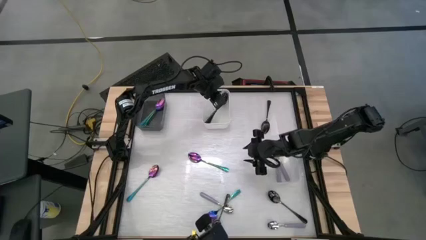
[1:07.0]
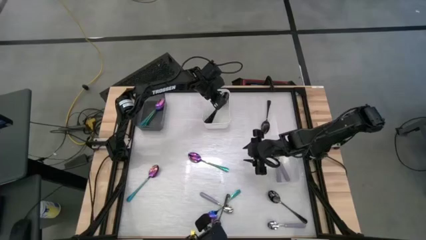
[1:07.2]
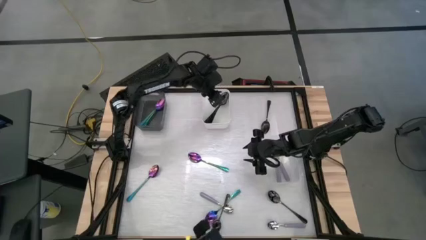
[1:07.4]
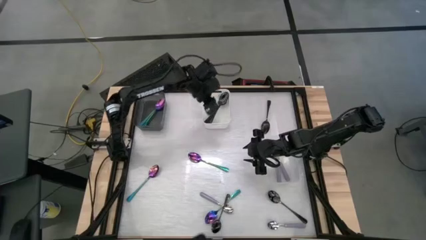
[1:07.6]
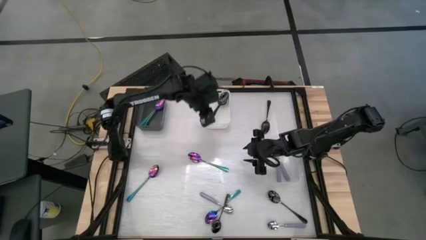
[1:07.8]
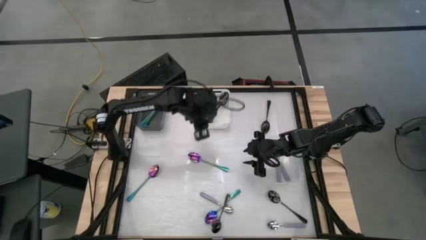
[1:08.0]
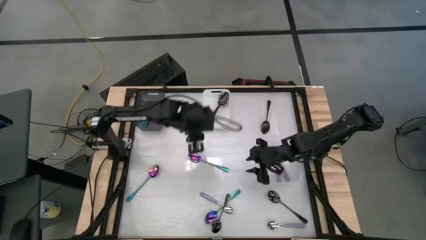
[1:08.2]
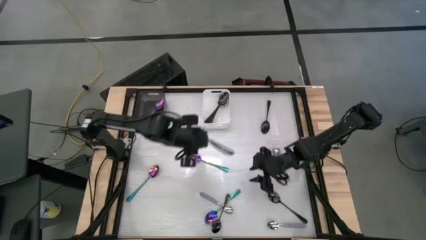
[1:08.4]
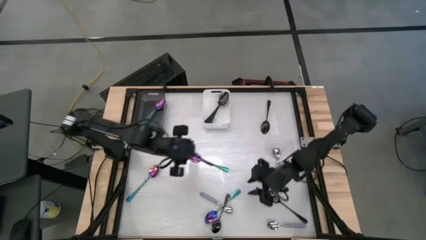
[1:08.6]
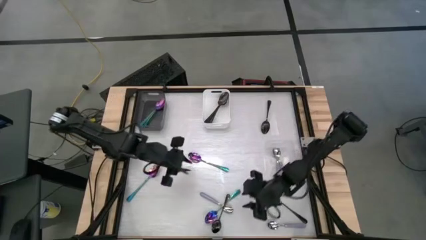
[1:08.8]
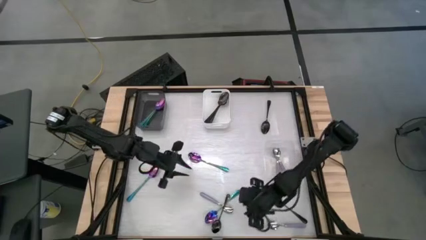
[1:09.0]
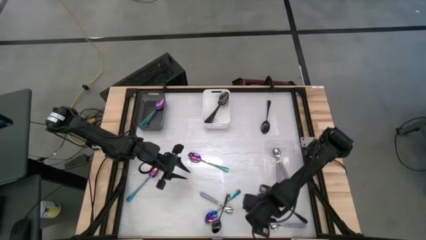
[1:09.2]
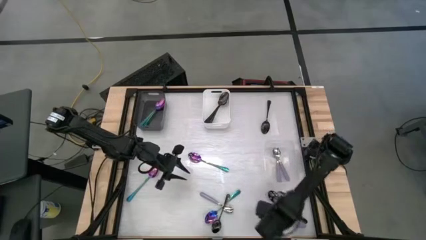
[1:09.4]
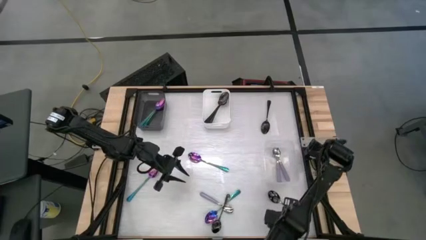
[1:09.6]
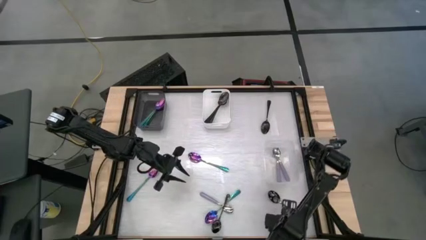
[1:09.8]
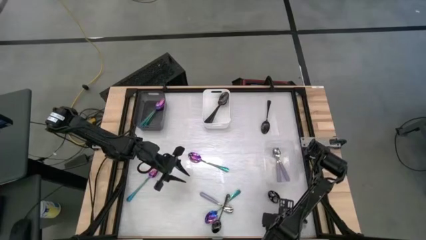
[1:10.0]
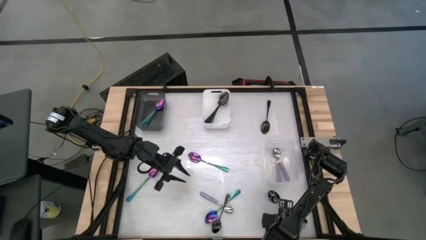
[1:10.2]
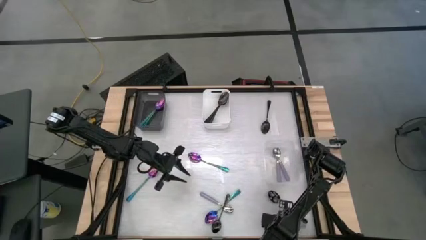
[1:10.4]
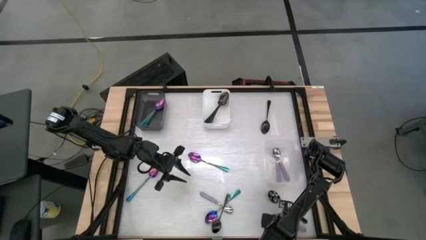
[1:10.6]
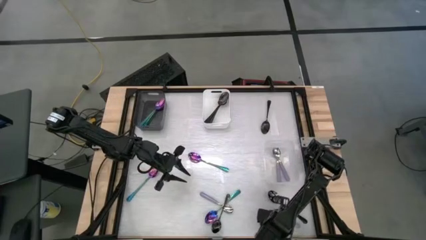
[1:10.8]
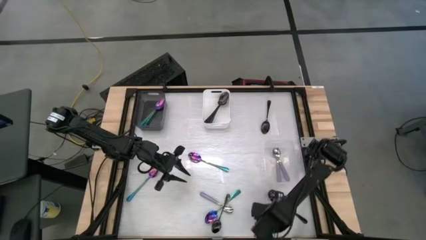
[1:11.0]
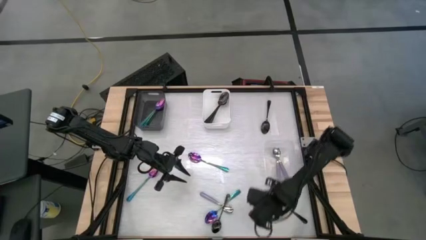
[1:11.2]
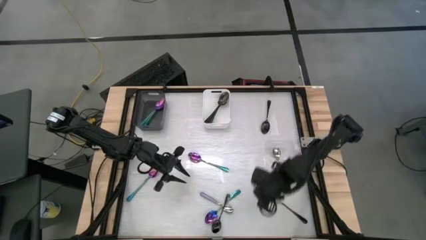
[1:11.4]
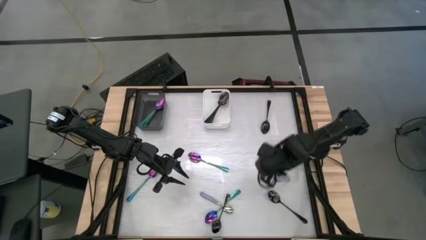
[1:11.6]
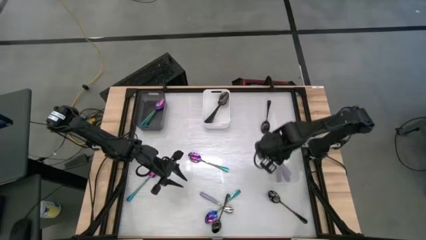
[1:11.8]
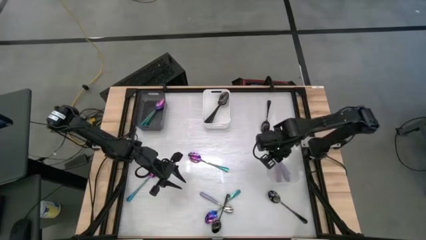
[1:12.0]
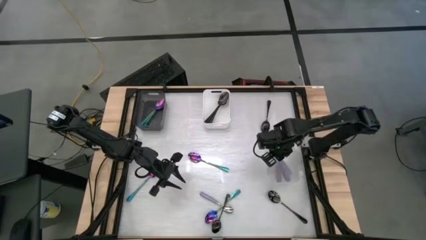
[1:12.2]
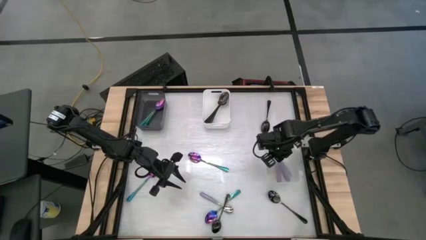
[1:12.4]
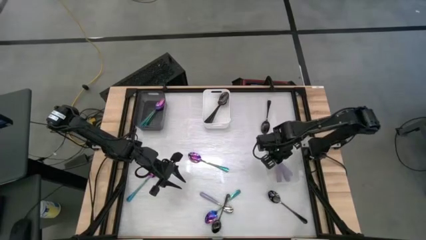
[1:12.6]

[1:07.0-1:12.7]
Task: Sort silverware by color (type)
Put the violet spoon into the transparent bin

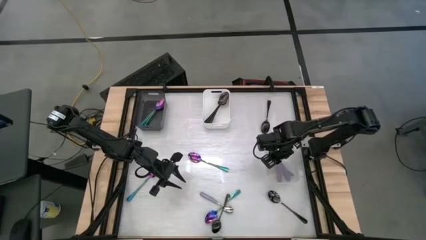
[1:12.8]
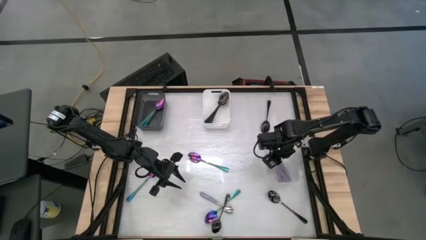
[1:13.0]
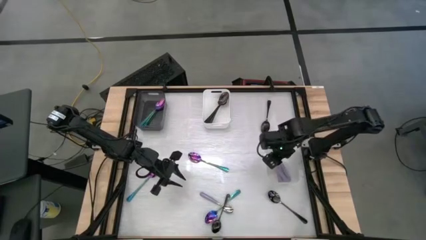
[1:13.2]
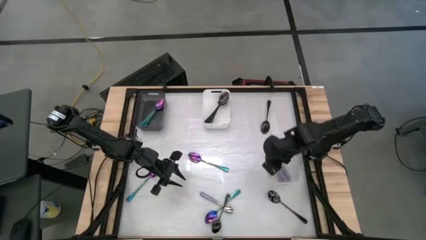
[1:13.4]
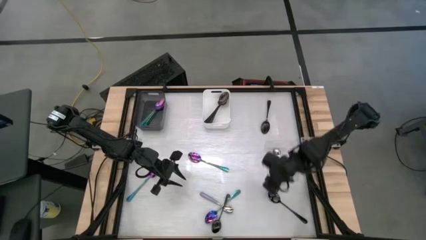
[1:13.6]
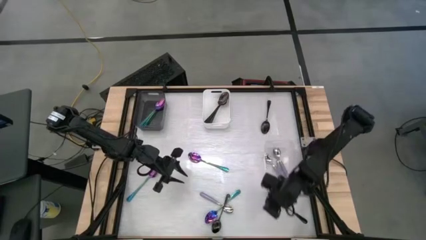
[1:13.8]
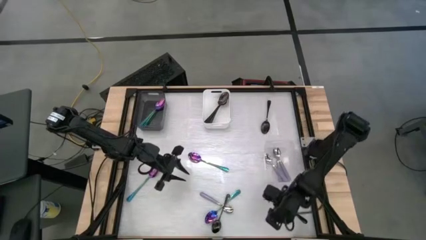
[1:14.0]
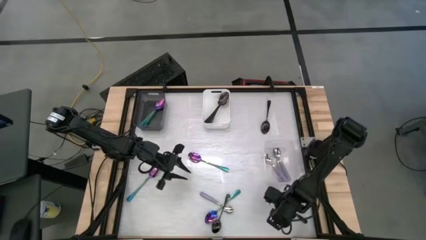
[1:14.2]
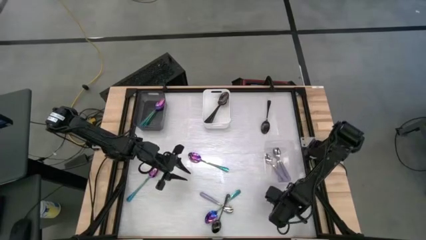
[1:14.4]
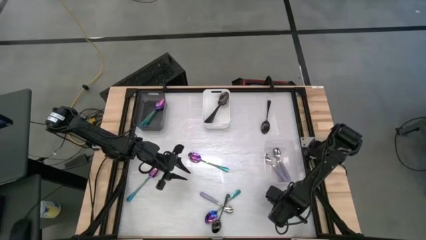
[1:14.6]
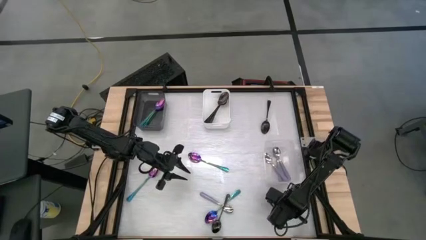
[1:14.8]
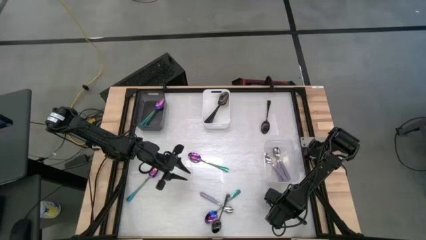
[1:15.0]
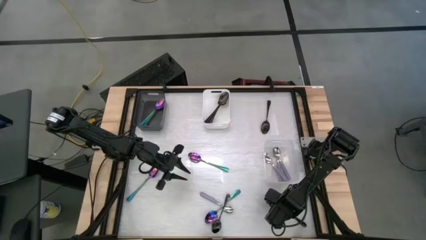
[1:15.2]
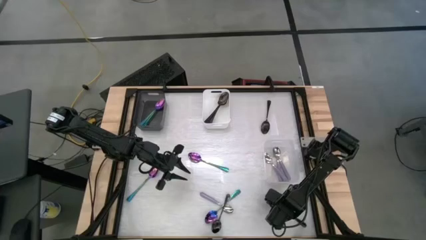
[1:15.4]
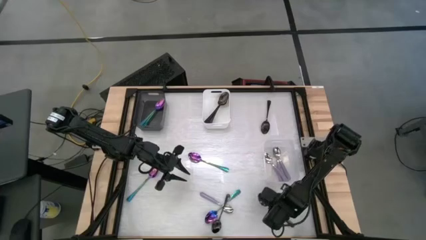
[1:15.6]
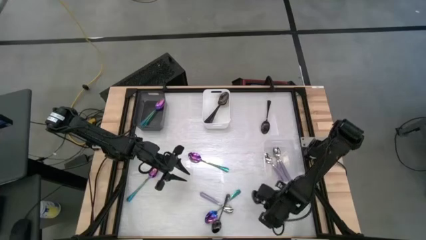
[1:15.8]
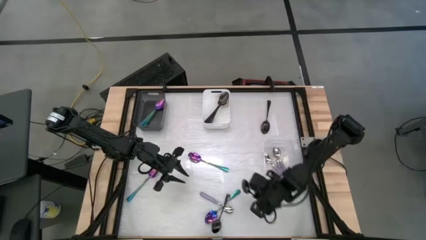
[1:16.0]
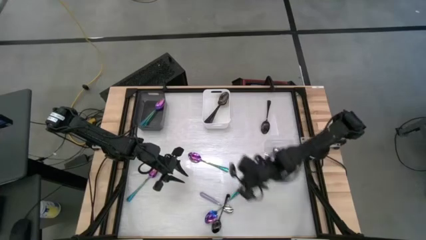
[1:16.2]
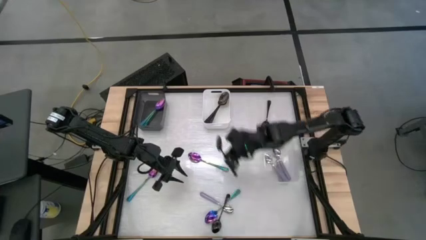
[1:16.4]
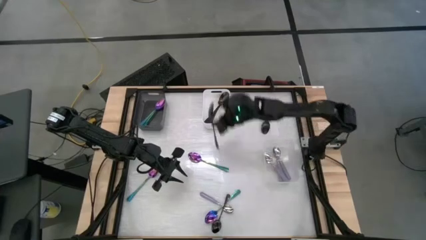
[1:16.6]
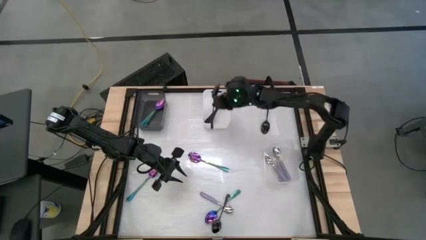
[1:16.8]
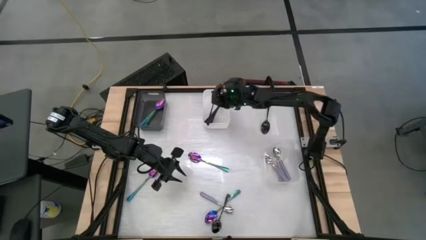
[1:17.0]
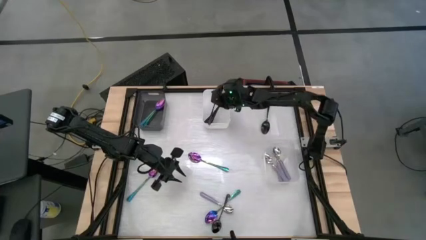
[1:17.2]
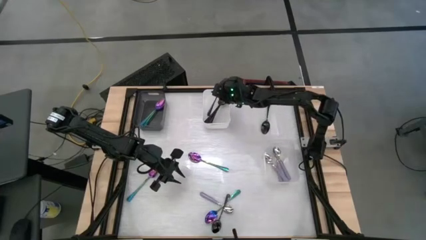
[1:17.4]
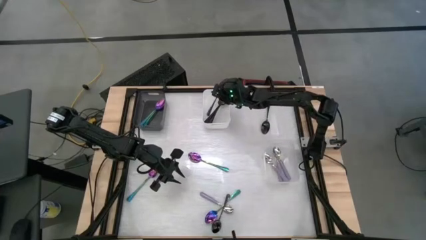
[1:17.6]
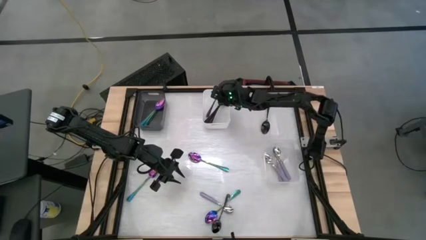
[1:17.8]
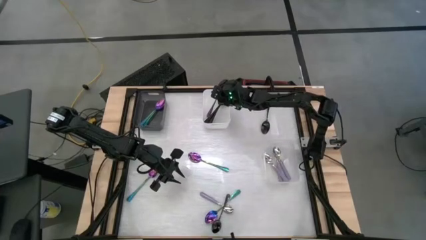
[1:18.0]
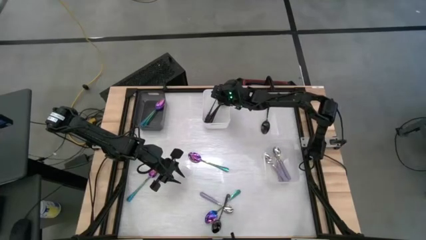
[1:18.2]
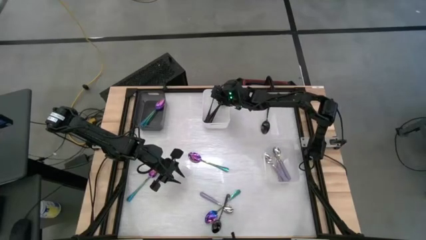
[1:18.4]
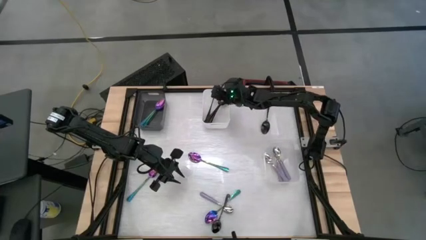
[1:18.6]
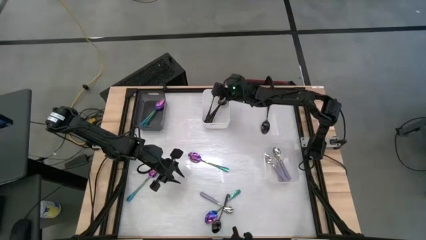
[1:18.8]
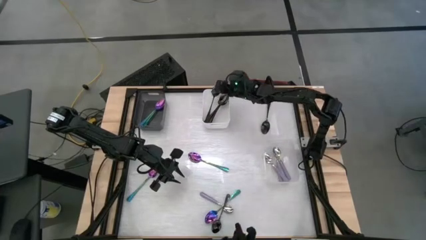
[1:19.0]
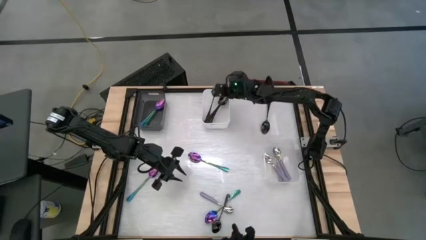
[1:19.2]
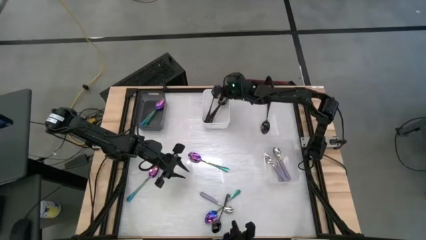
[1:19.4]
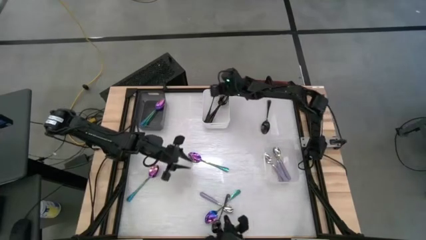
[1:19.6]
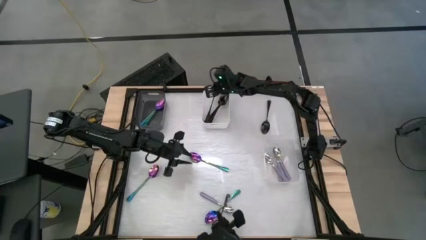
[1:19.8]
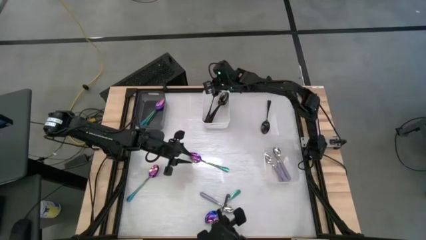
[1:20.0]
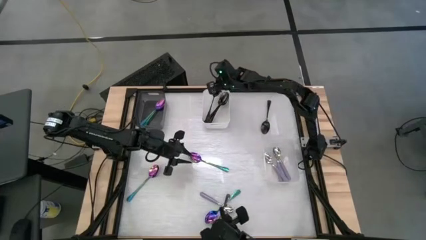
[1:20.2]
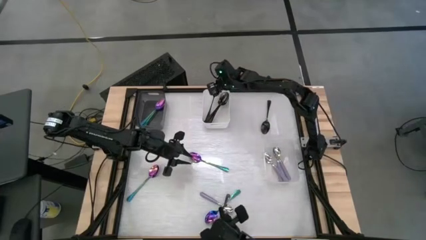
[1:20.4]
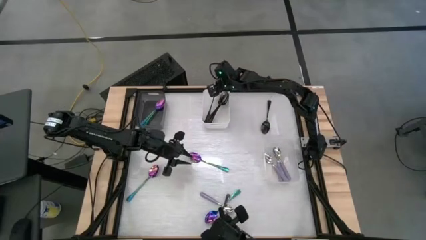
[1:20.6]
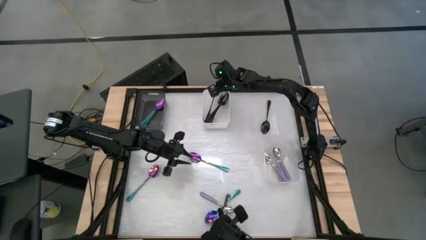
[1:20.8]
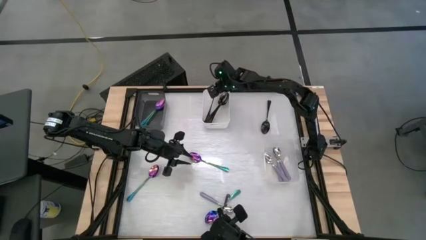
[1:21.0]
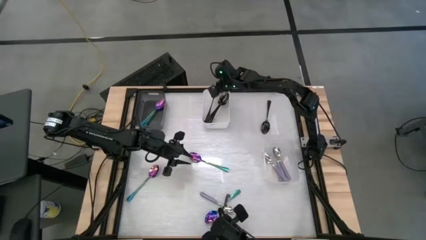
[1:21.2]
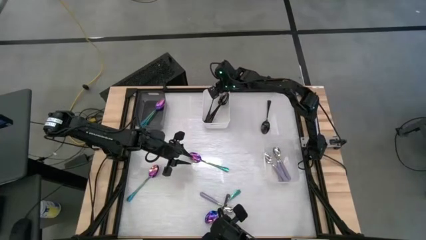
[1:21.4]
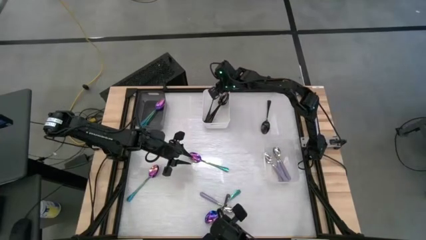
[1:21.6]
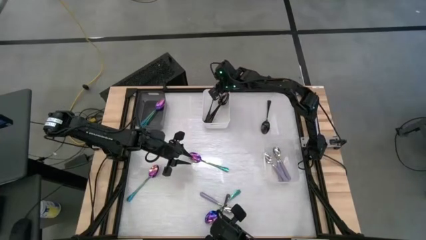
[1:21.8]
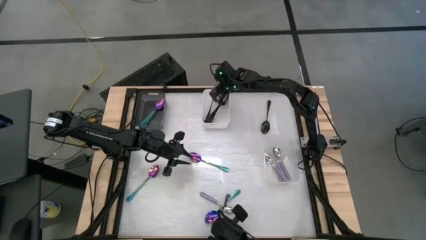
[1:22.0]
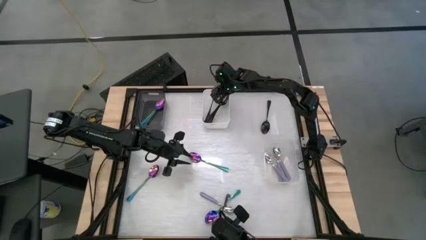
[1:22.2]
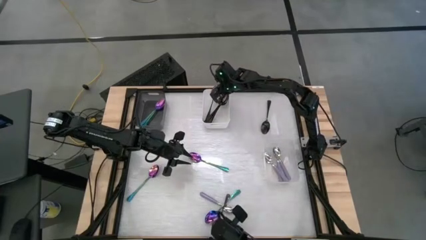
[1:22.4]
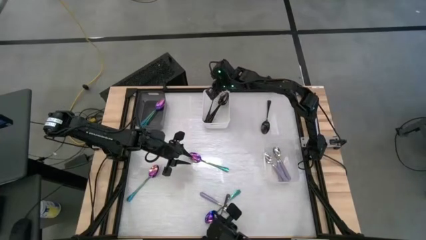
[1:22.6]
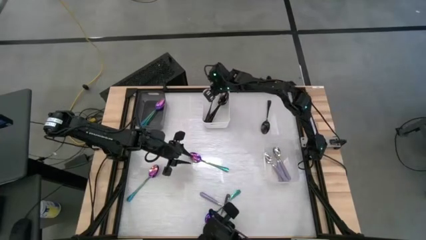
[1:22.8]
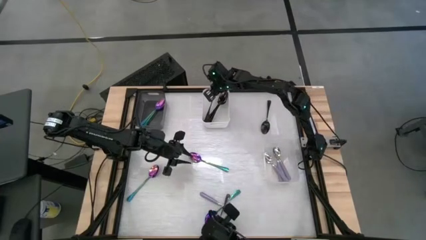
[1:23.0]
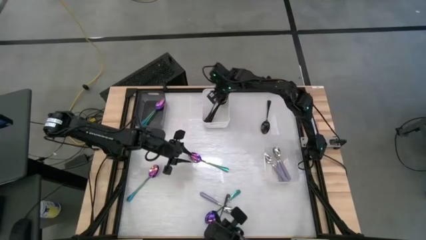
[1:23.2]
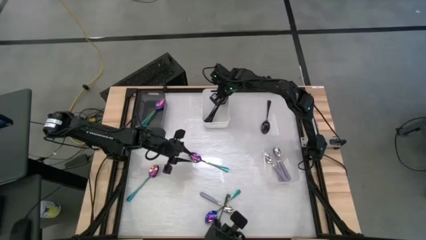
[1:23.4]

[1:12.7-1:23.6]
Put the black spoon into the white bin
